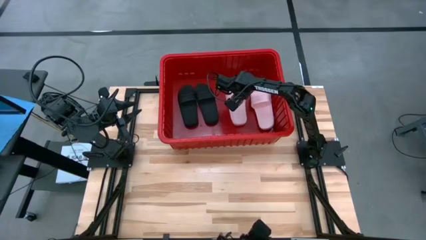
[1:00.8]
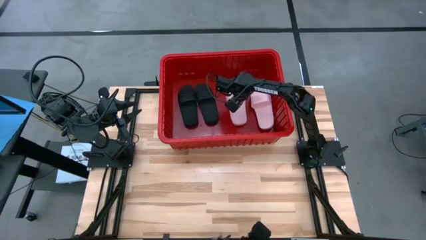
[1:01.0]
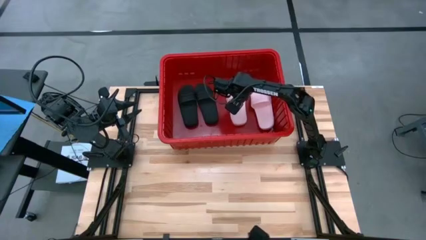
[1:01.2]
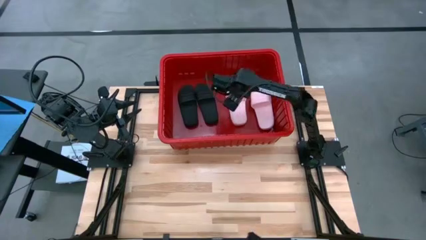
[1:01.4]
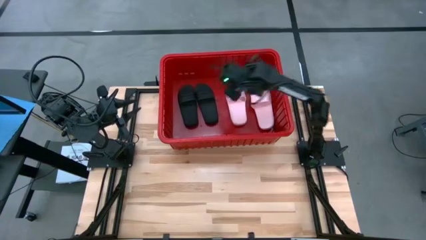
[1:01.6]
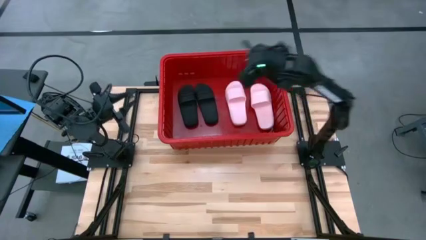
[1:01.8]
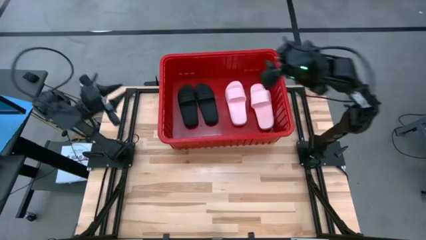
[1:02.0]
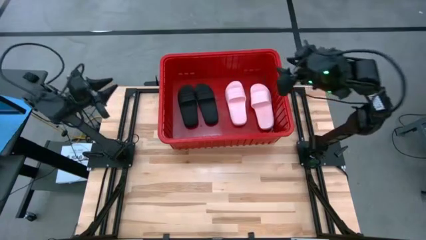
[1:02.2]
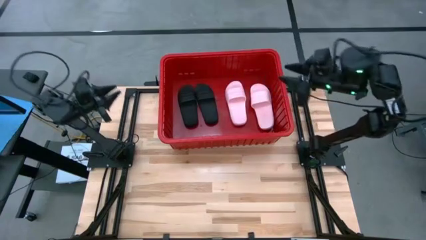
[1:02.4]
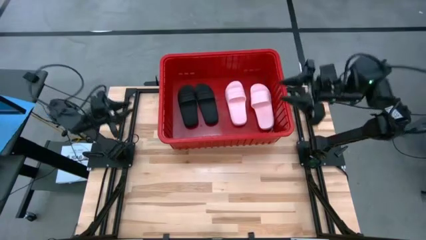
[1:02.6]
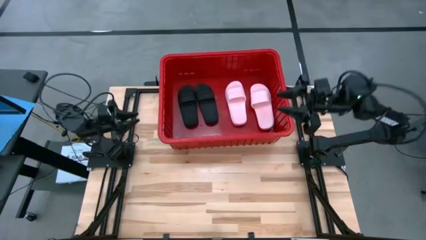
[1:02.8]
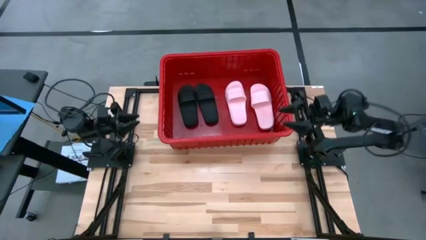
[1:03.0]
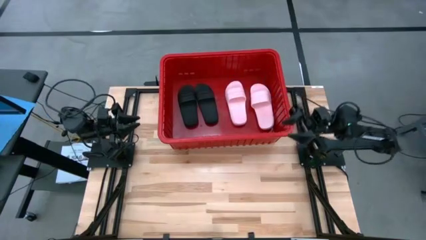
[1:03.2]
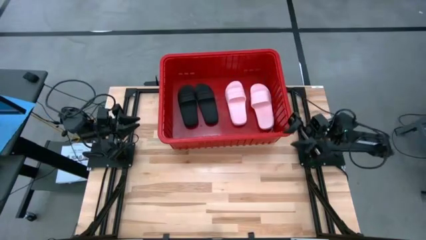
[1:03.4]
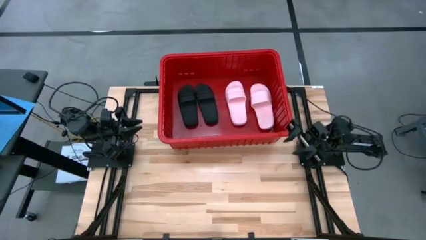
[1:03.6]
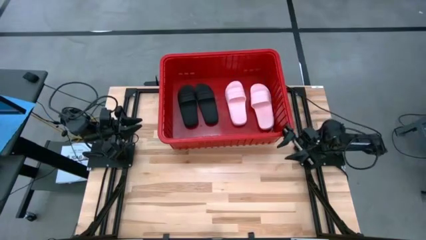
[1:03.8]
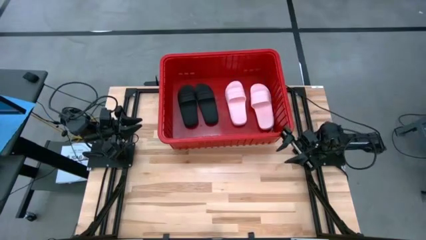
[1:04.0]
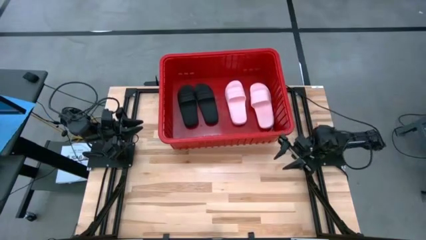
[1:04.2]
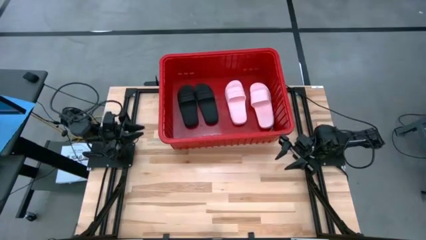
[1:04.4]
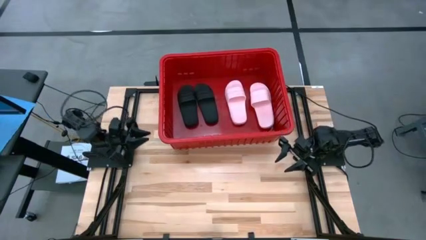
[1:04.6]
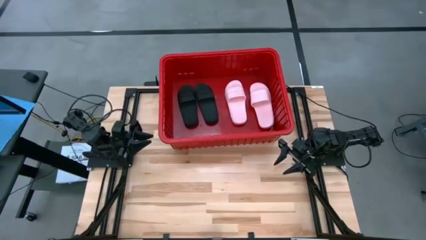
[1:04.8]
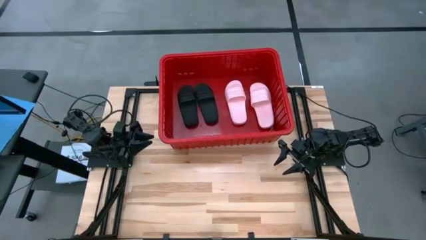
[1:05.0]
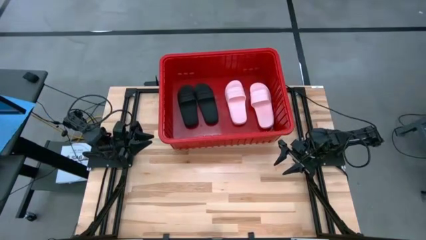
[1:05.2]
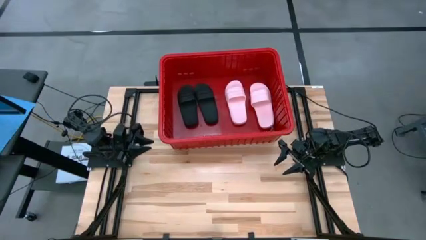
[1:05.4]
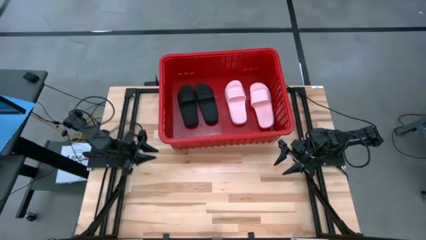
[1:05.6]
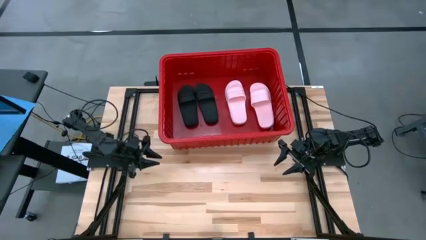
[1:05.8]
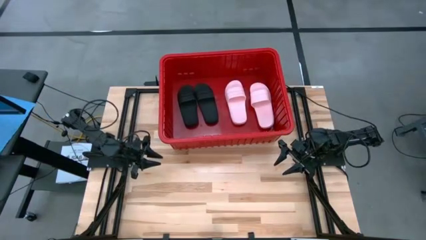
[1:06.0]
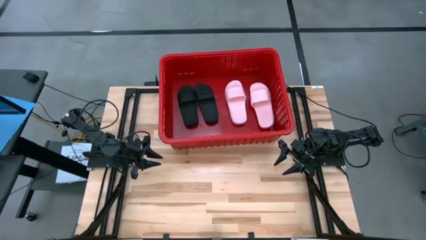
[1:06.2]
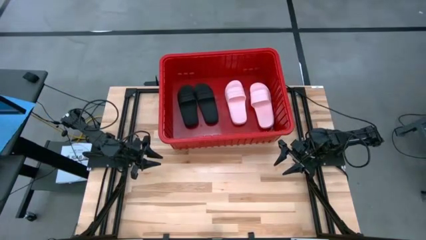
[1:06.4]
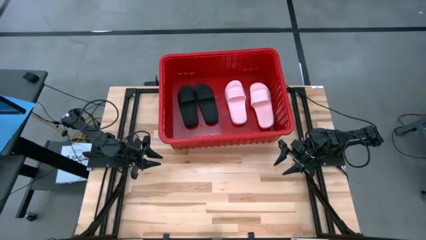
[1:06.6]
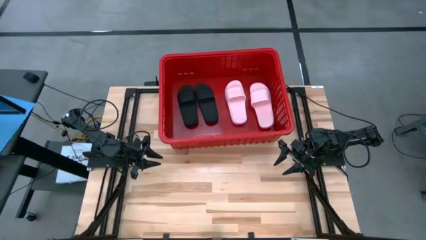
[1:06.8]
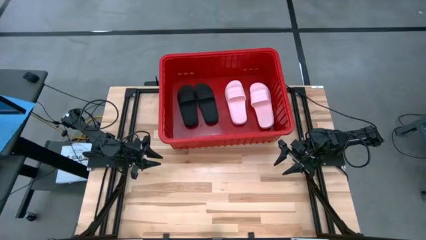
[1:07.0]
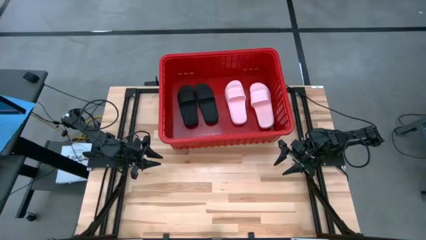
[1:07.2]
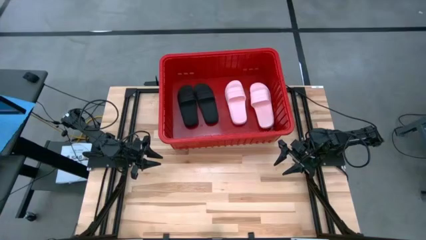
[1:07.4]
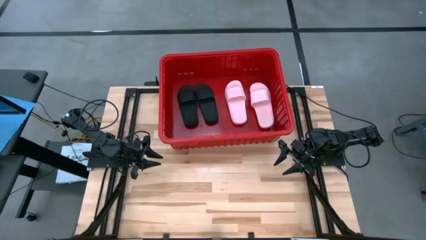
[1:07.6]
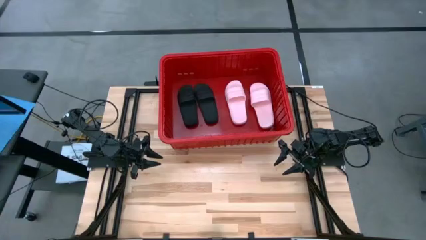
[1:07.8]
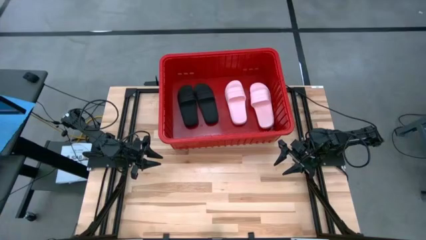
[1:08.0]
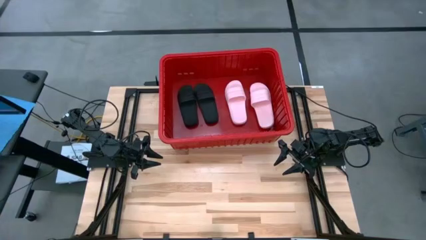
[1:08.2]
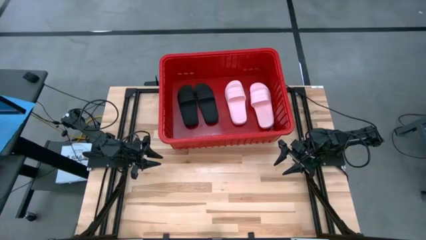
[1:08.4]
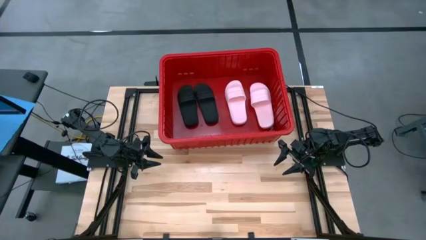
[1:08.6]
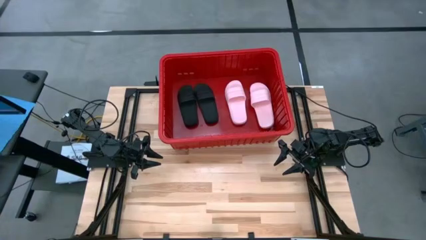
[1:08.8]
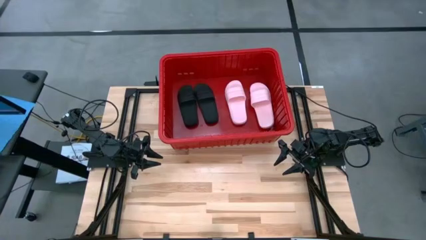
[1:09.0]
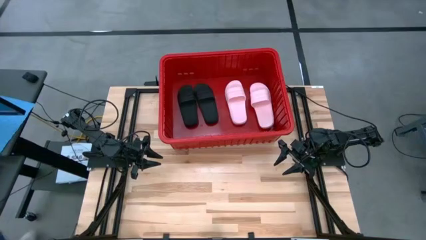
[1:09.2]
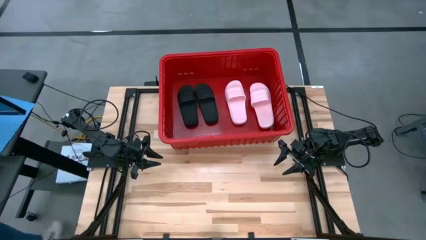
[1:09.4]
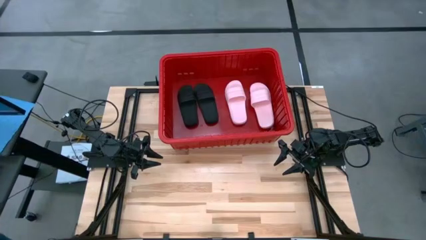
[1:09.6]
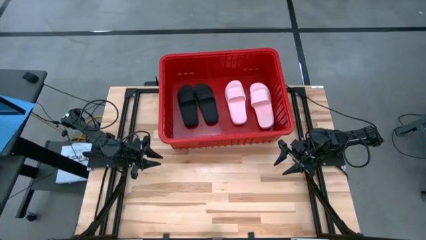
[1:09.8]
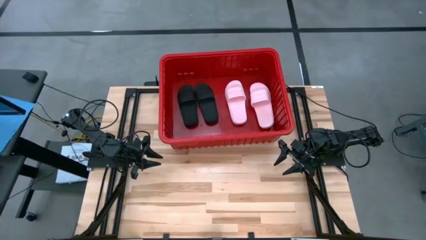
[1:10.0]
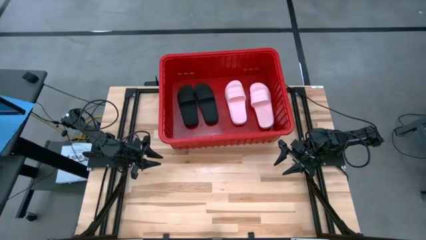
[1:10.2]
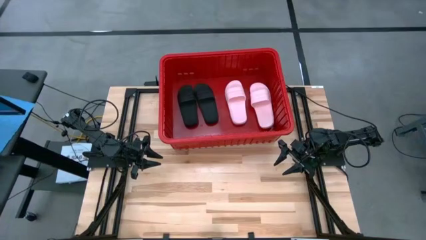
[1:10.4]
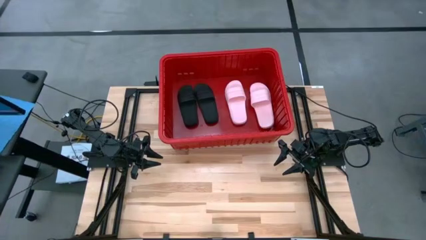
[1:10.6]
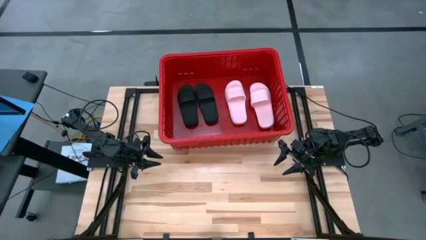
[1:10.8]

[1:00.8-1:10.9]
Task: Pick and place slides into bin
Return to Home Position

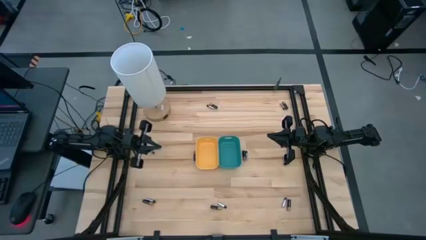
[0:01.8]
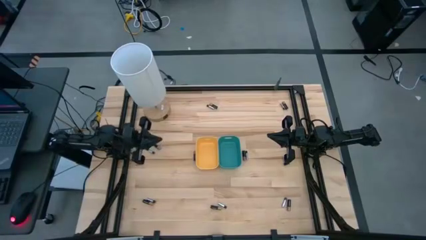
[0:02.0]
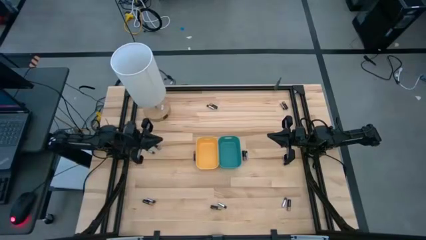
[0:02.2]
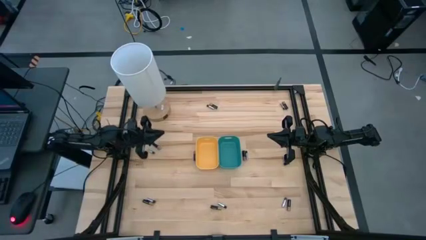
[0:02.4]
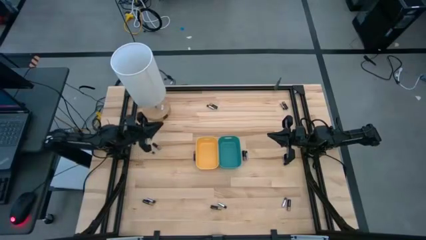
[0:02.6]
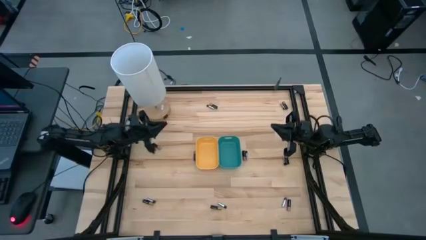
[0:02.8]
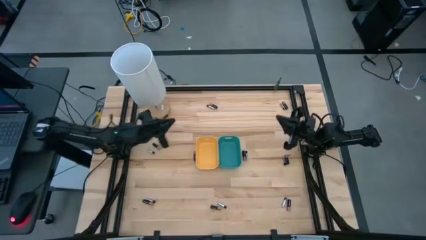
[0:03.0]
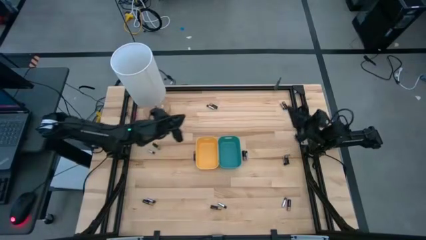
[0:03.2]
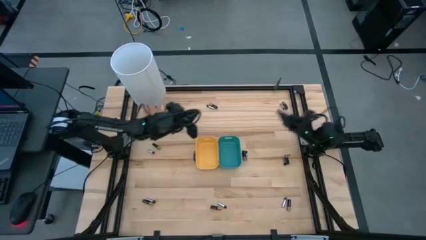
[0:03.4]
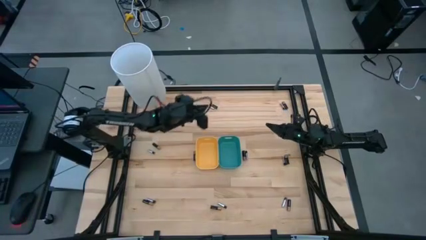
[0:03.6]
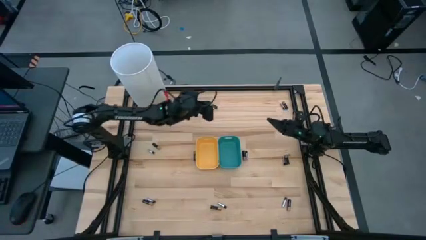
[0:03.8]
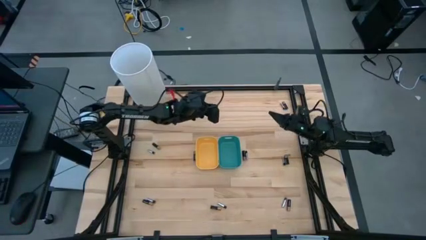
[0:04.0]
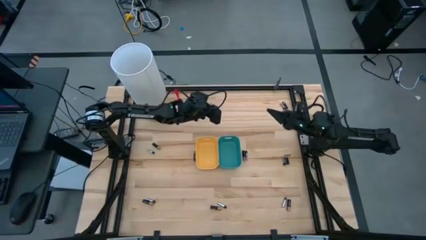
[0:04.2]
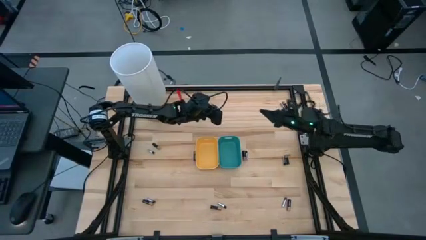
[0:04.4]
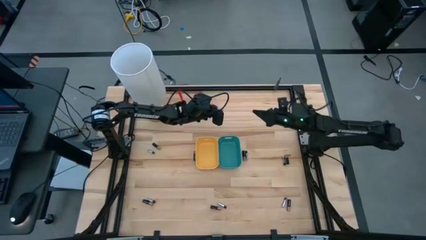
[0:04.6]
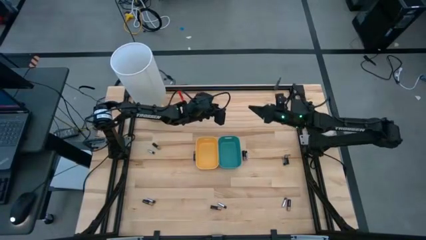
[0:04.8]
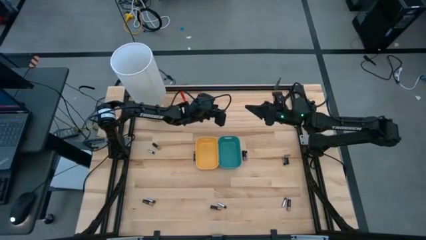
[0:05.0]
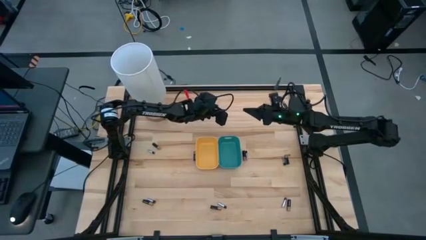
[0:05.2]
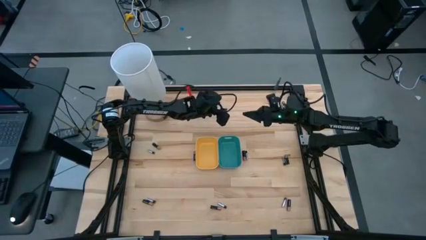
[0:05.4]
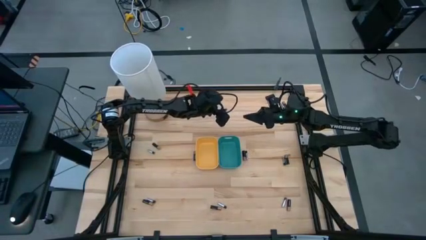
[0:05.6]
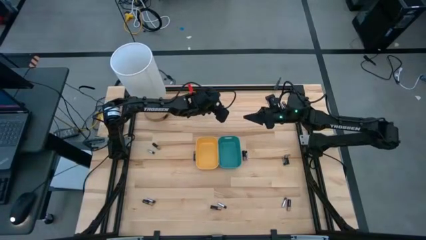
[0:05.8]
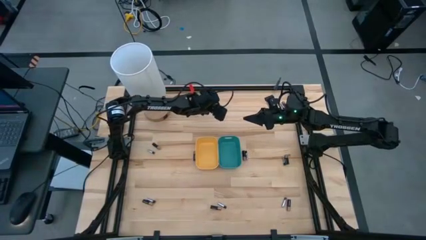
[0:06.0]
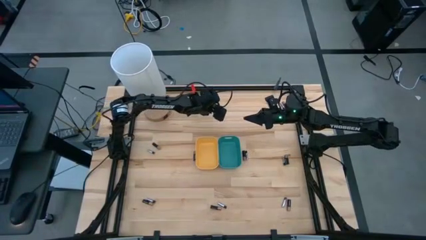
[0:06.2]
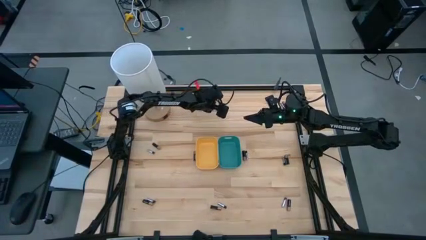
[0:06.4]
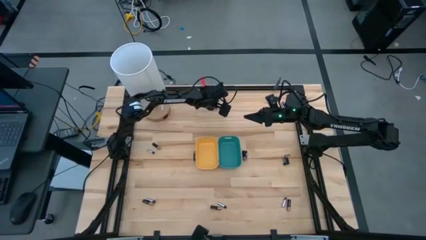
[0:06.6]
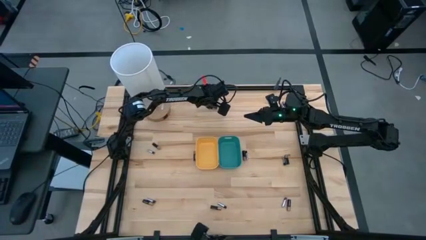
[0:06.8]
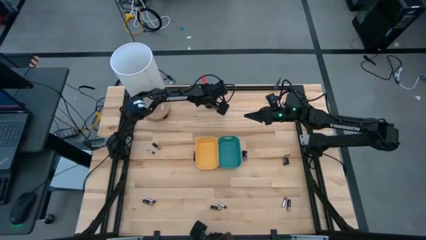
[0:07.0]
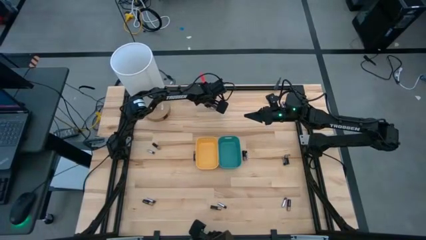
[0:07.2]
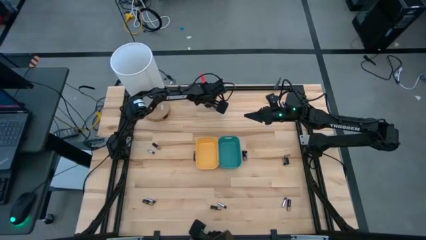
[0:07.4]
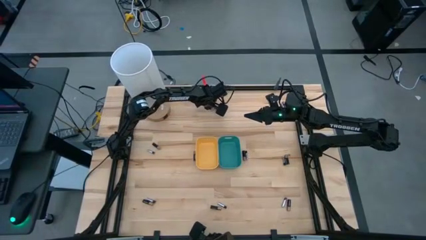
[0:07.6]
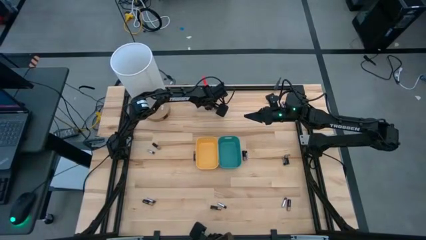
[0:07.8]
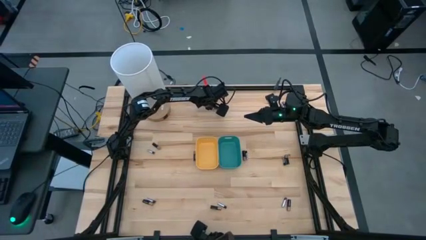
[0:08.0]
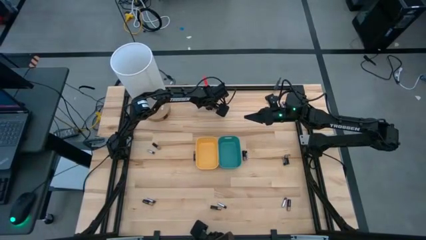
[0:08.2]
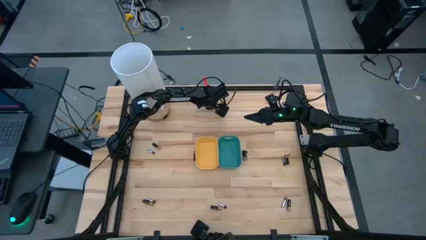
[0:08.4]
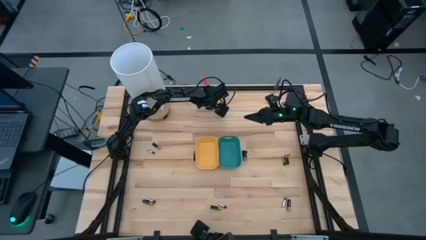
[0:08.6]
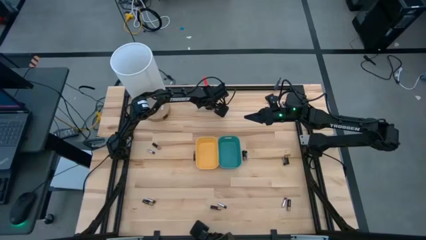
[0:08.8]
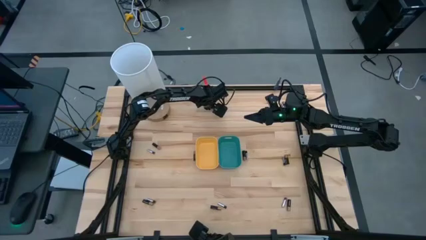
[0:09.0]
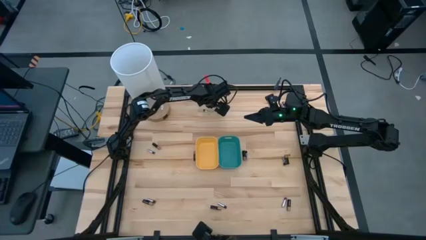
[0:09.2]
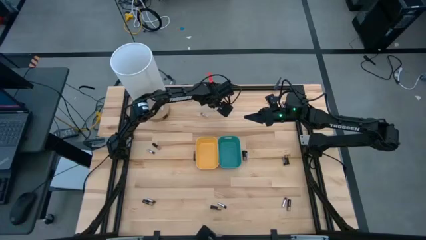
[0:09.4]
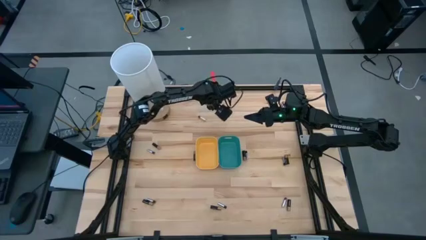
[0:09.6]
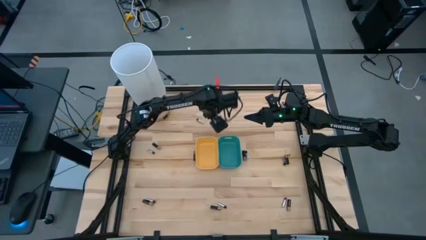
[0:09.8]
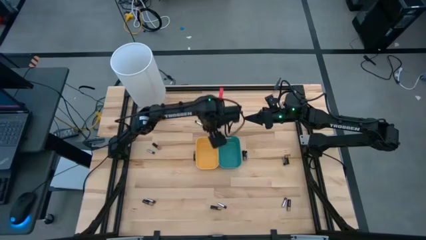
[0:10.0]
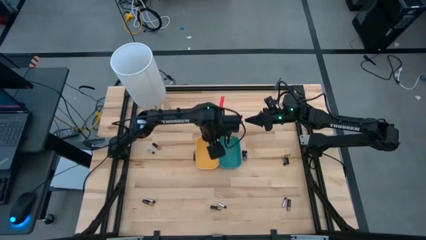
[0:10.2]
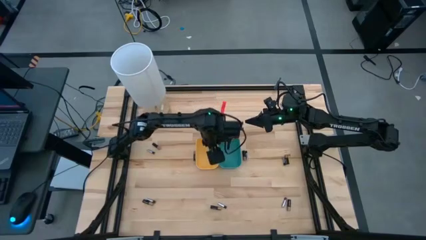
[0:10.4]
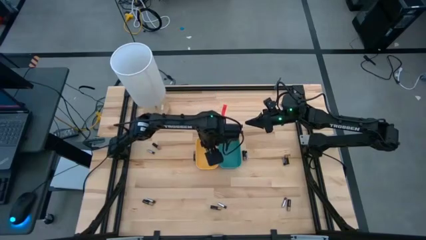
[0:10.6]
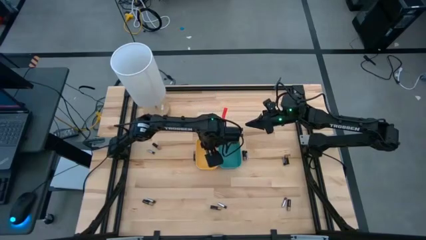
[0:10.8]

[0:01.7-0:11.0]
Task: Sort batteries
Put the black battery into the yellow bin
